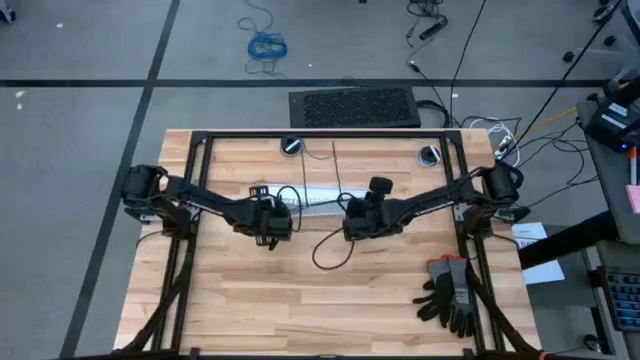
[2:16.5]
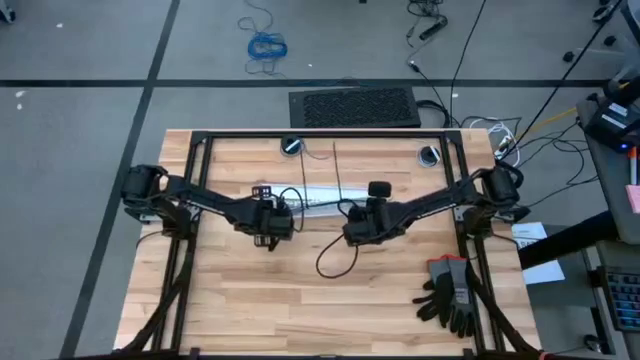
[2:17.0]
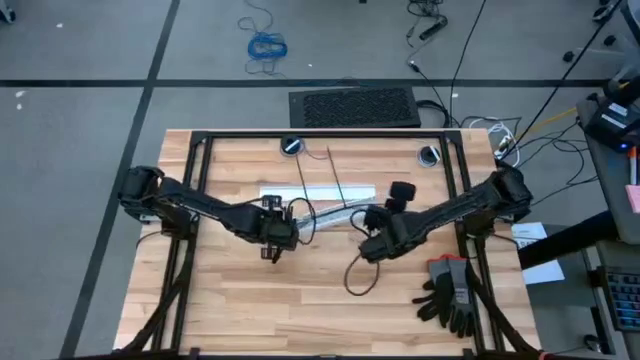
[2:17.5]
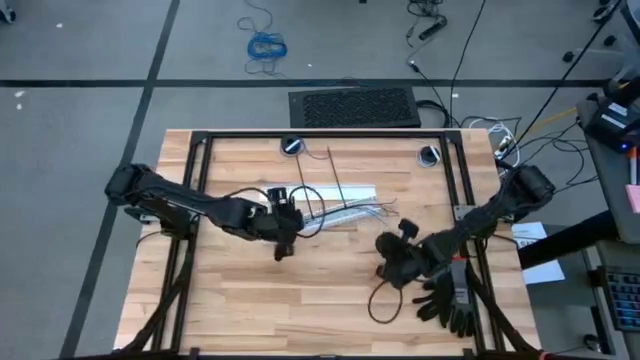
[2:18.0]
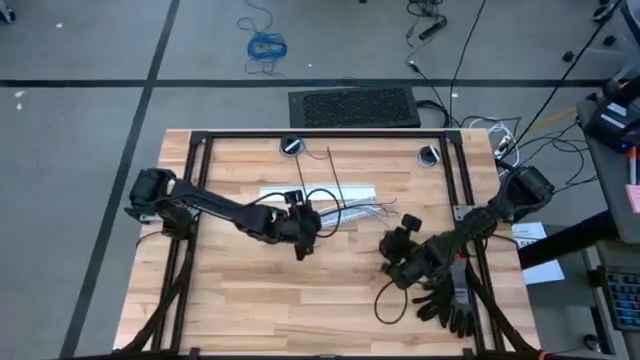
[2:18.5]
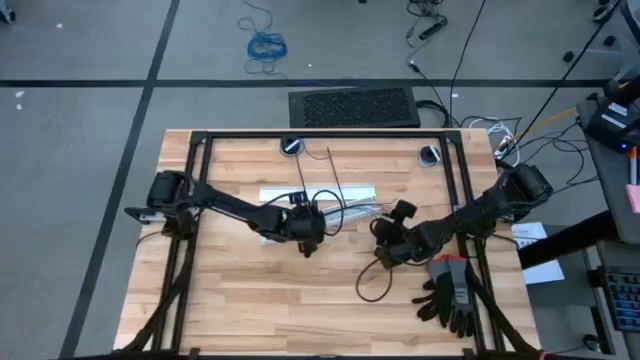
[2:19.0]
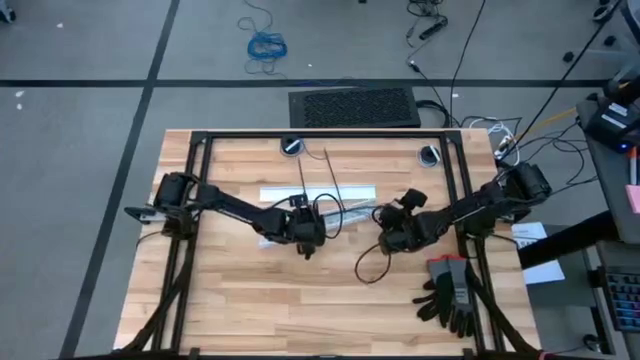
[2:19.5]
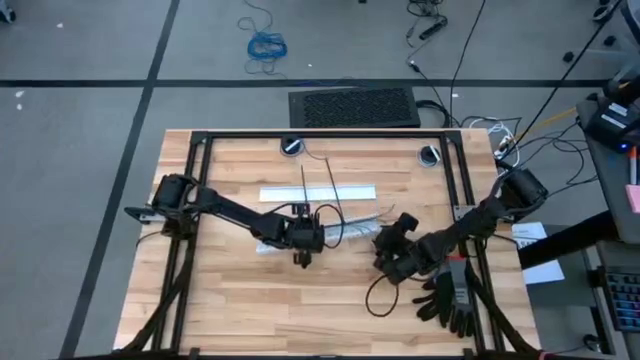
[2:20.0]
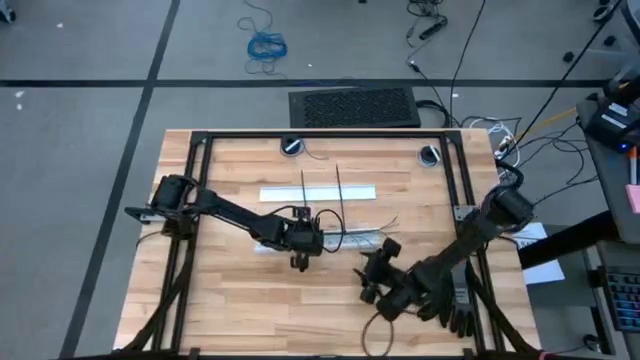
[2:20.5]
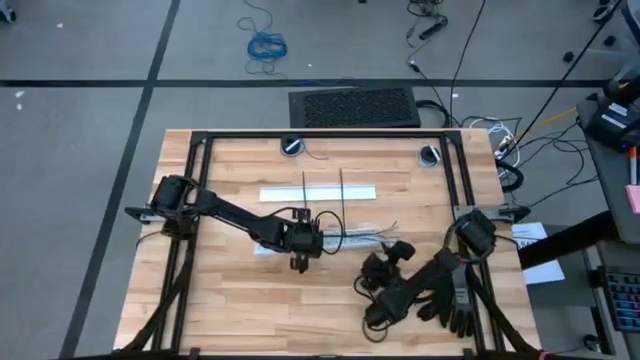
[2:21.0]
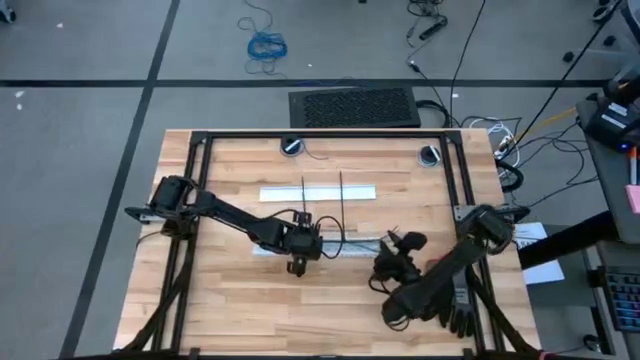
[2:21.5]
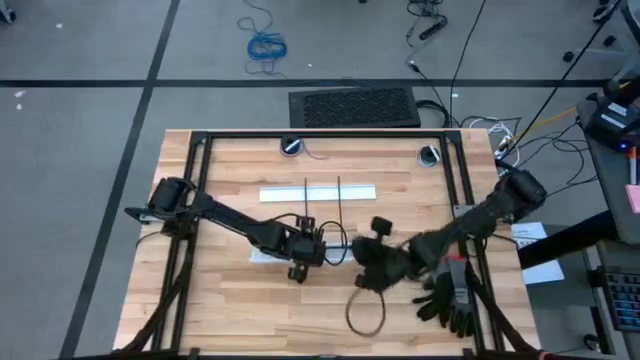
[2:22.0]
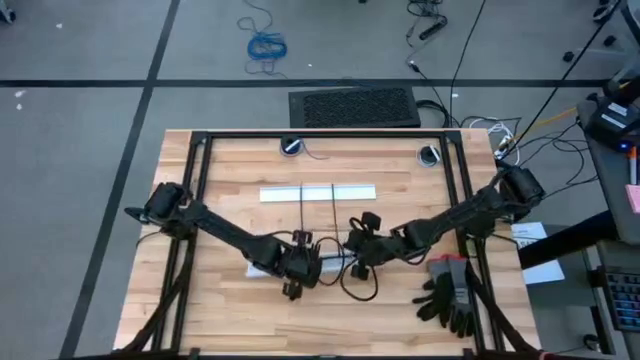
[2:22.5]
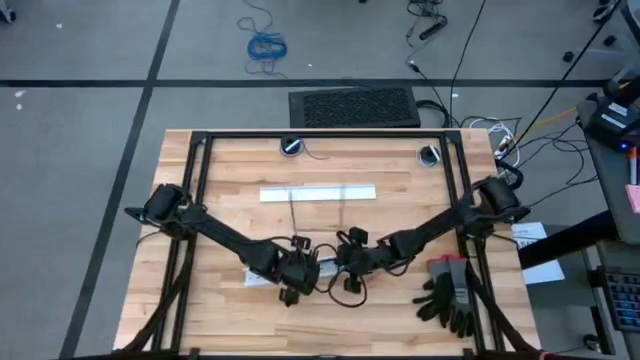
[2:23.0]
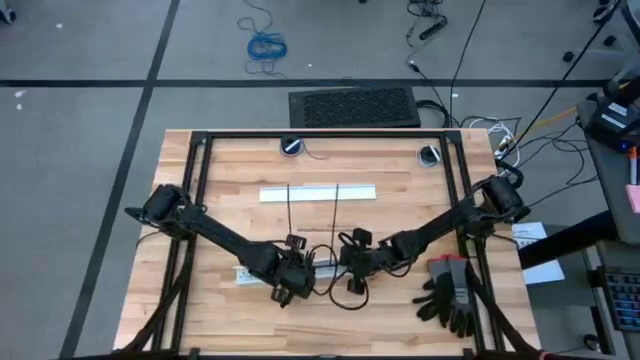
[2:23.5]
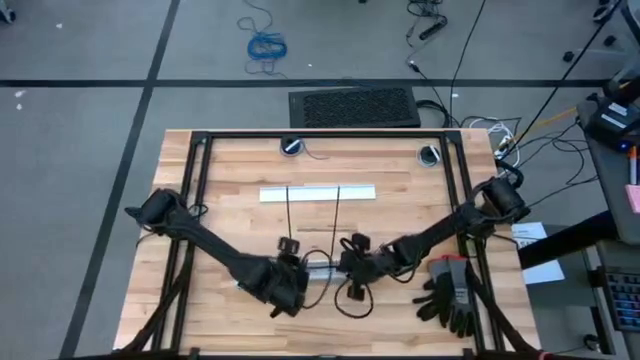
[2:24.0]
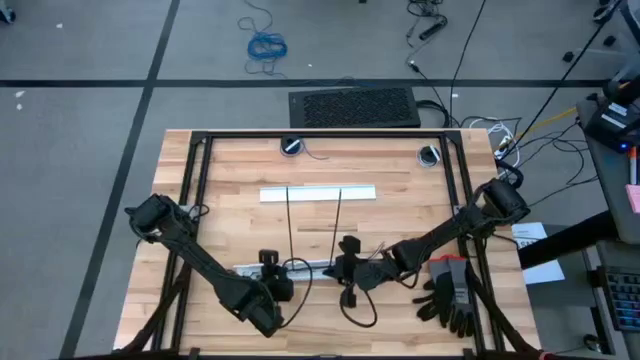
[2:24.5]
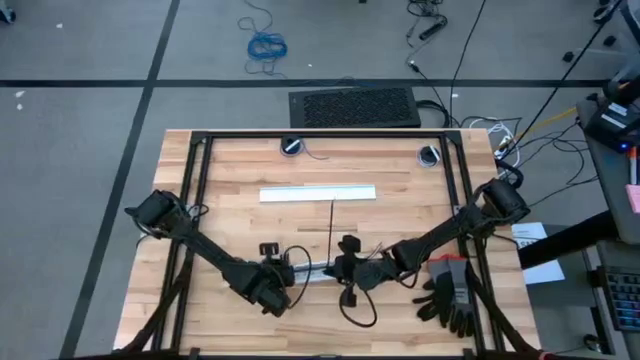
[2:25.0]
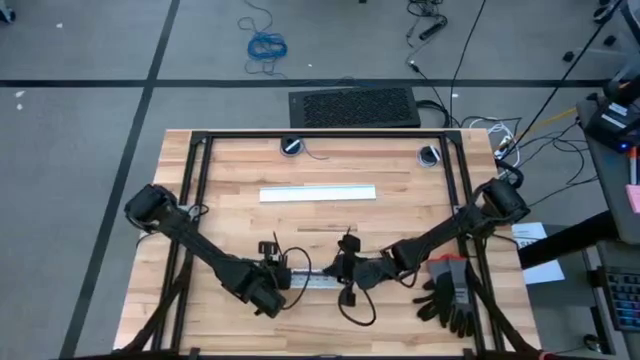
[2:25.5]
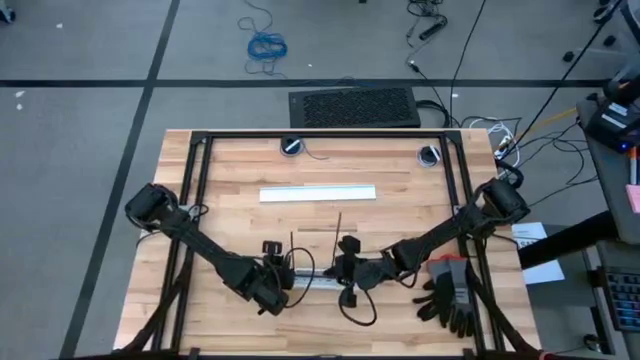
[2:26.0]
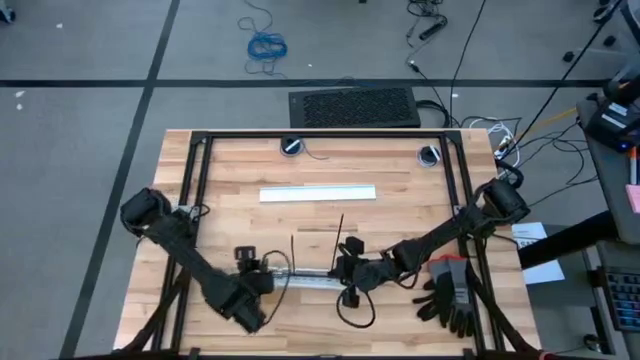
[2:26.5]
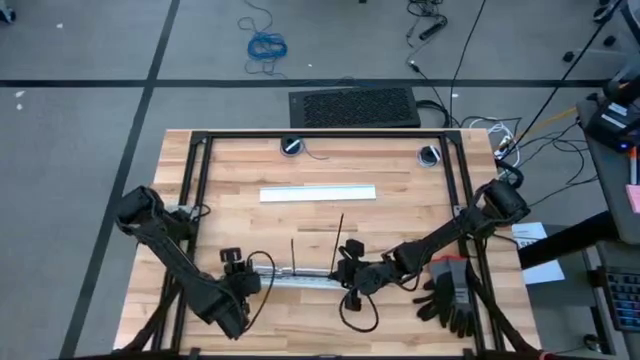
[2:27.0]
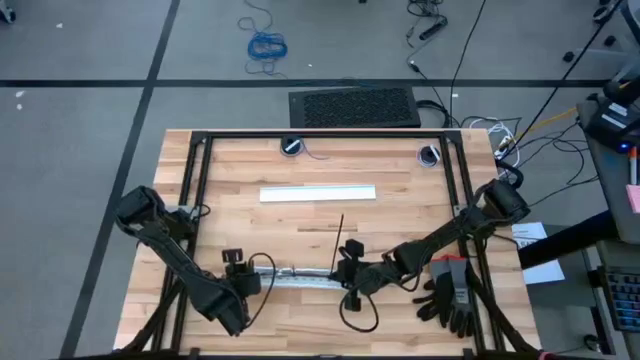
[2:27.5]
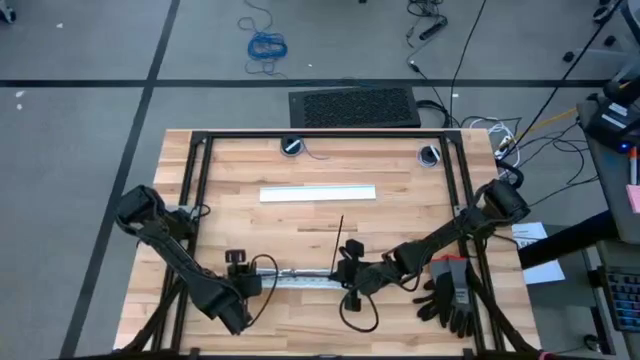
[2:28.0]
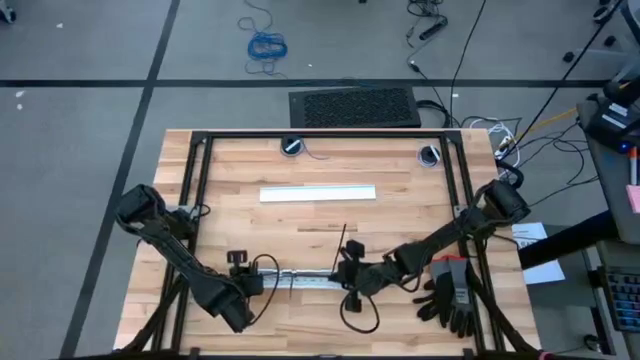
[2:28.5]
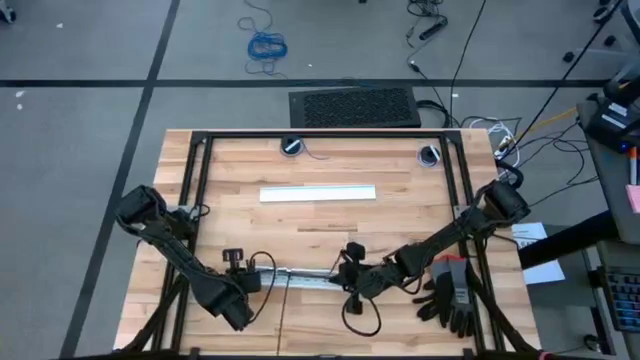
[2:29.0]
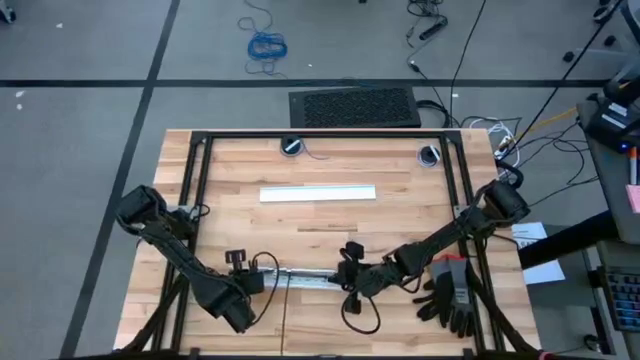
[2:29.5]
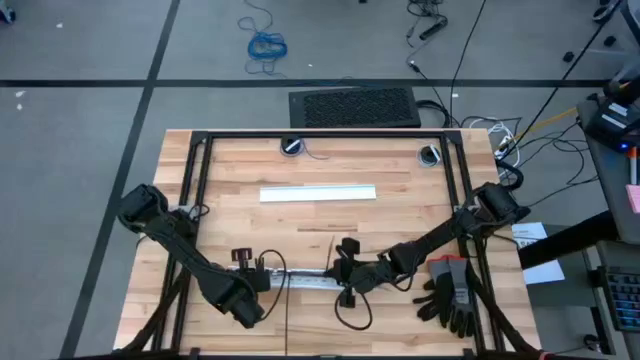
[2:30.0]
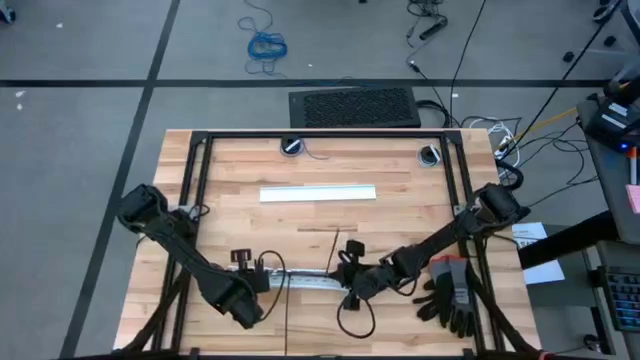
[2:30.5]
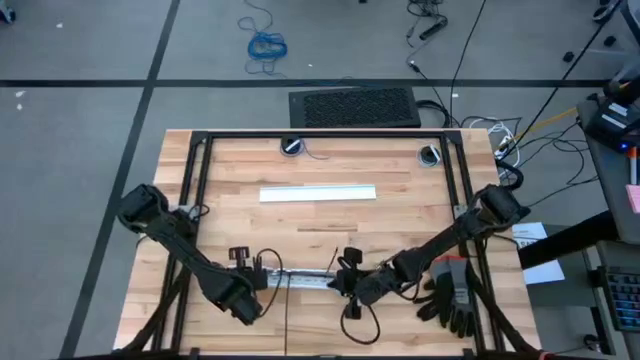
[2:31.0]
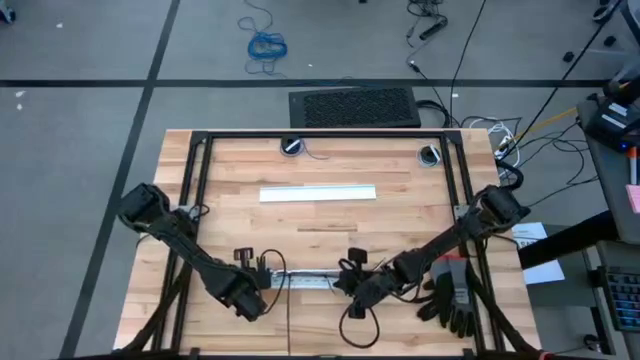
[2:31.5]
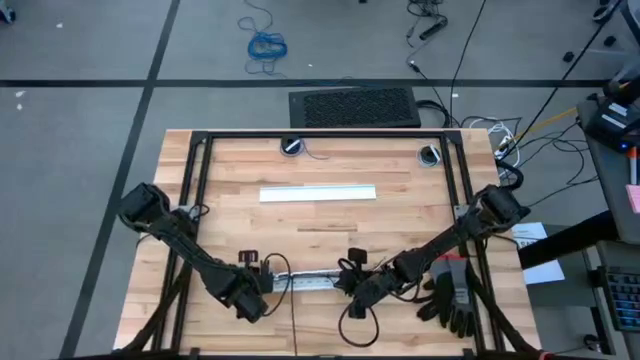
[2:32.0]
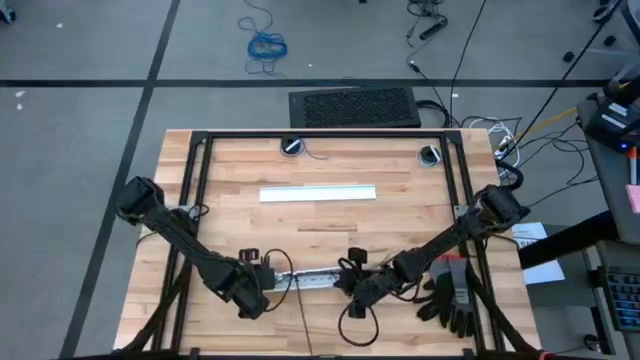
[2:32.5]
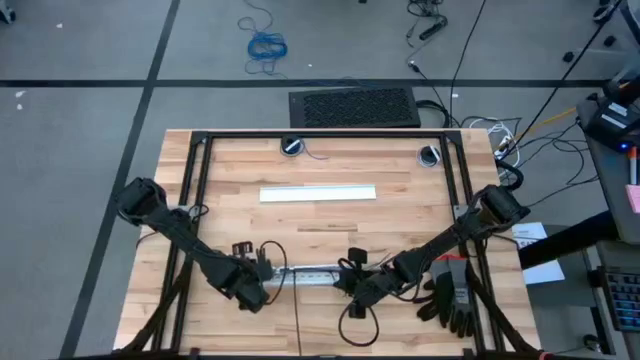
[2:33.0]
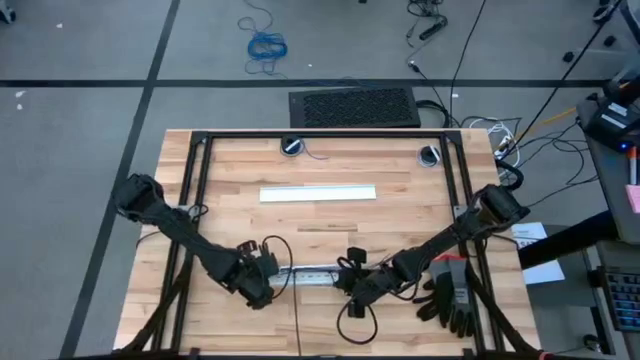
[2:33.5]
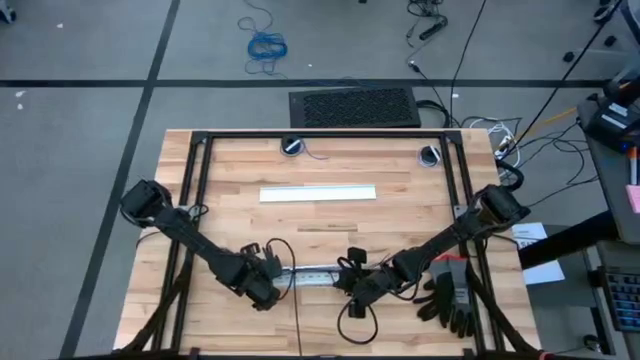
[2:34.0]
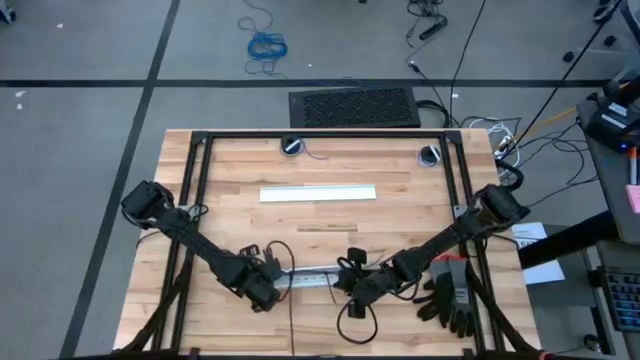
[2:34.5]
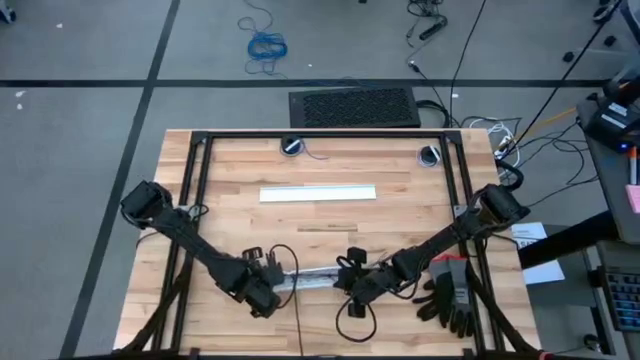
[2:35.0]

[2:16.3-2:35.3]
Task: Ziptie cables
Put the ziptied cables into the cable duct

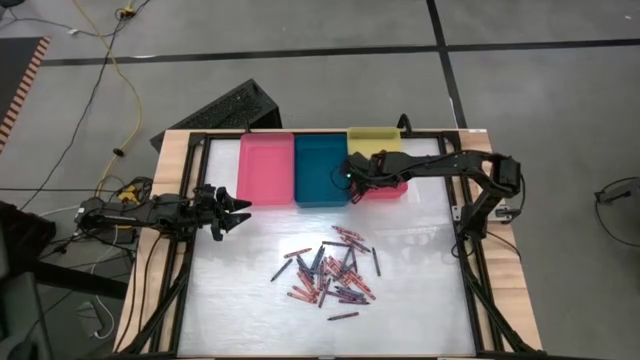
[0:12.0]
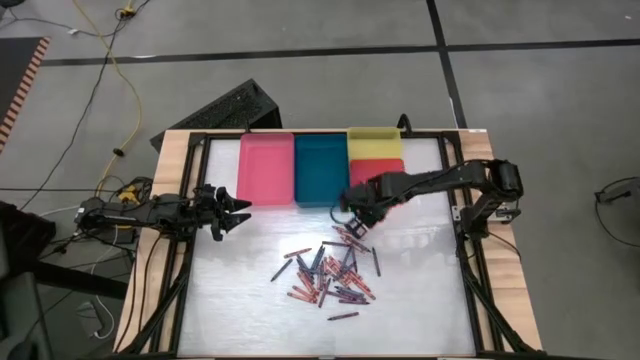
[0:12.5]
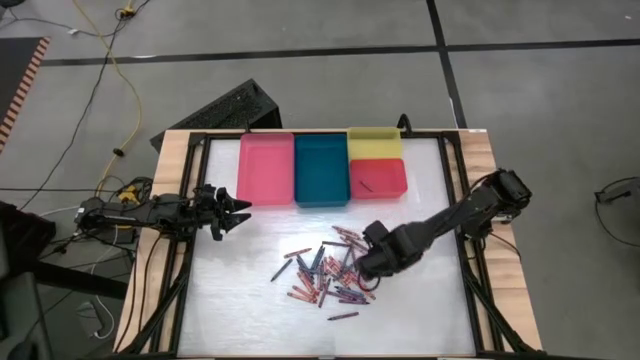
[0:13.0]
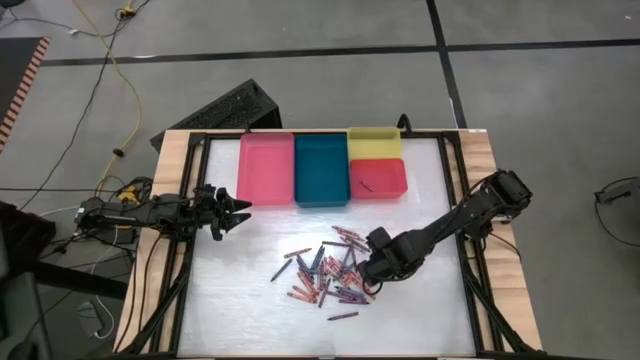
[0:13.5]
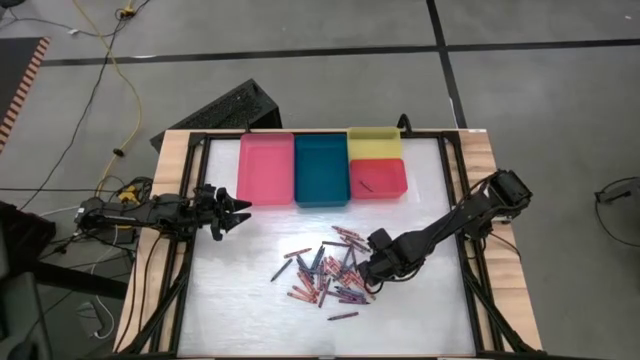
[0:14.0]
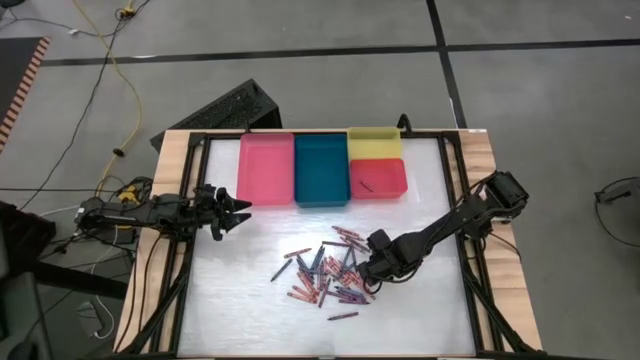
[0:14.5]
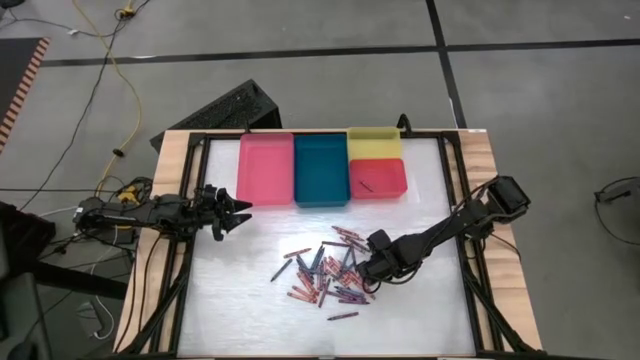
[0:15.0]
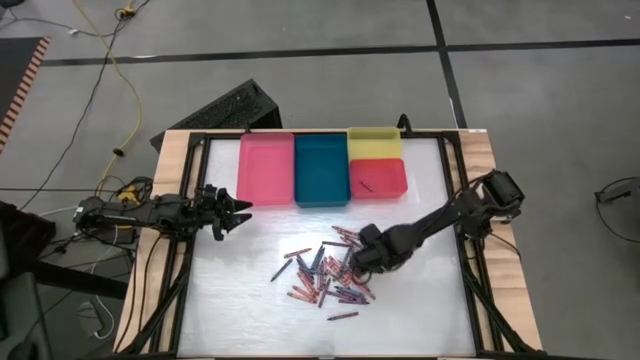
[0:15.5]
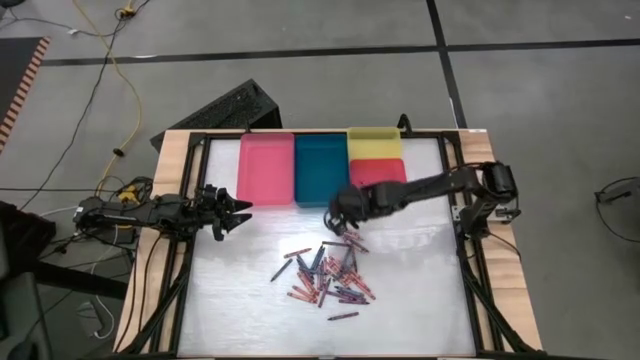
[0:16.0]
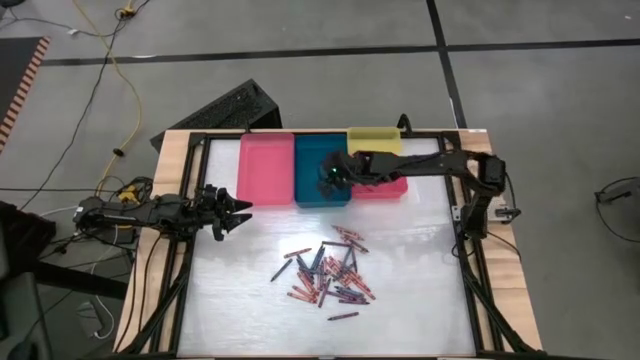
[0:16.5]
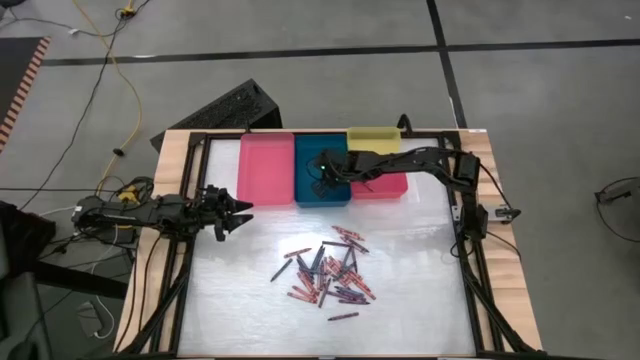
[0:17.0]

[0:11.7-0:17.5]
Task: Sort crayons
Put the violet crayon into the blue bin
